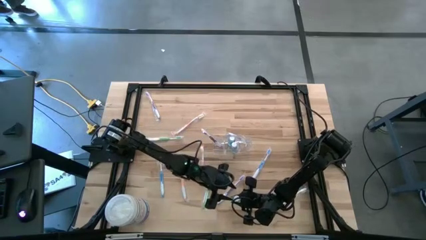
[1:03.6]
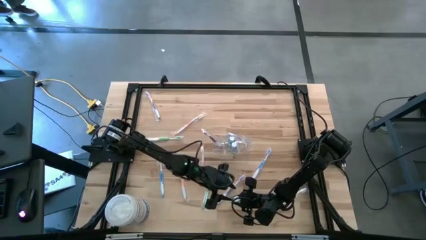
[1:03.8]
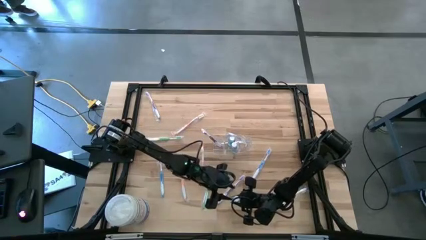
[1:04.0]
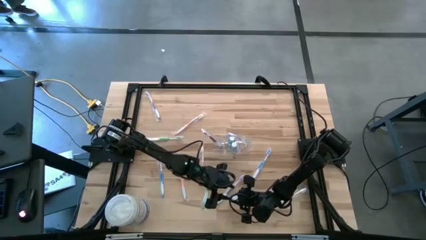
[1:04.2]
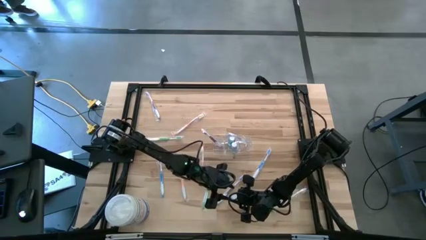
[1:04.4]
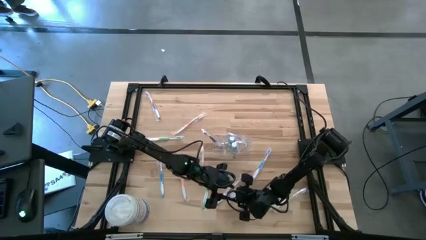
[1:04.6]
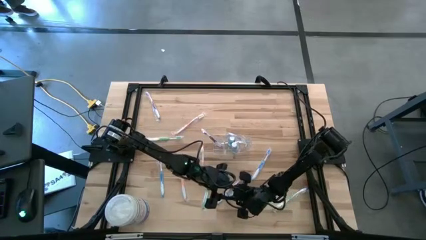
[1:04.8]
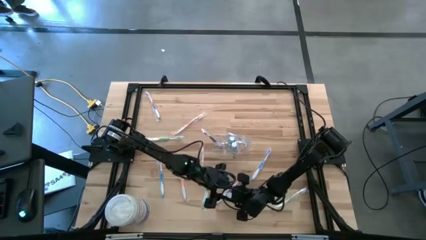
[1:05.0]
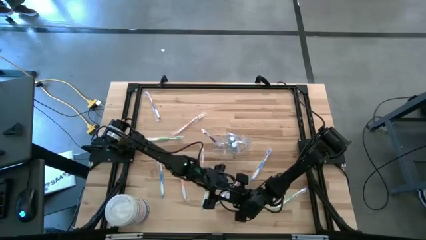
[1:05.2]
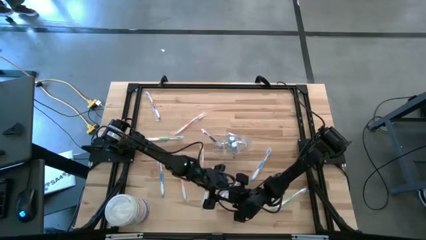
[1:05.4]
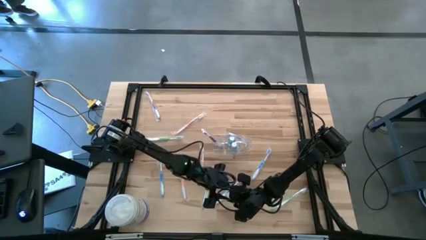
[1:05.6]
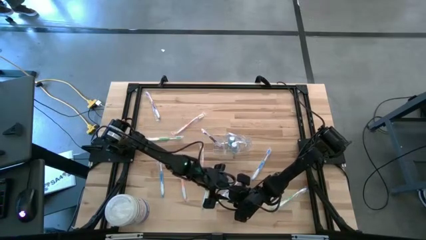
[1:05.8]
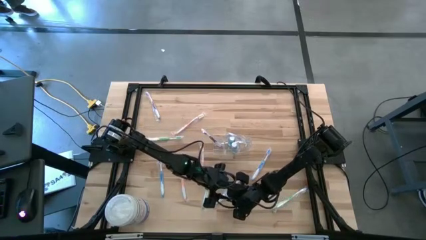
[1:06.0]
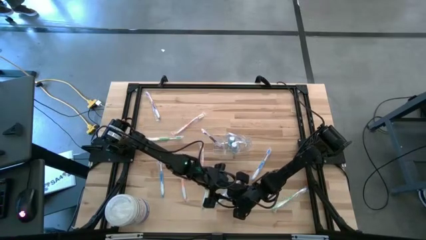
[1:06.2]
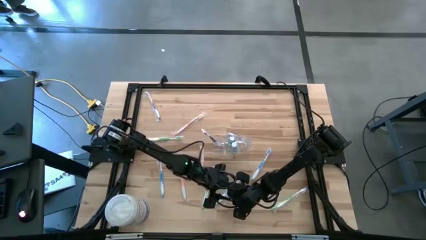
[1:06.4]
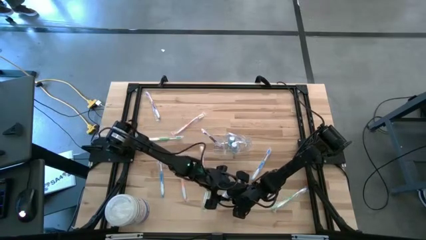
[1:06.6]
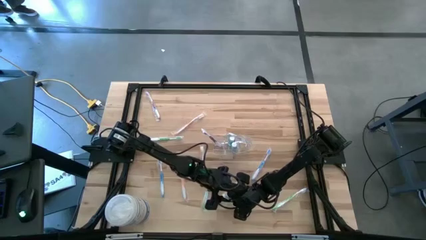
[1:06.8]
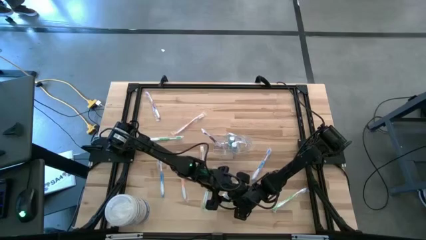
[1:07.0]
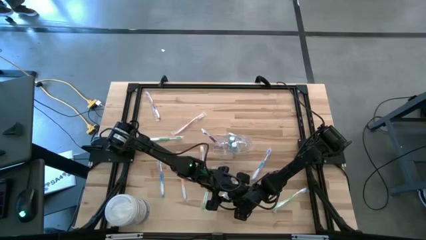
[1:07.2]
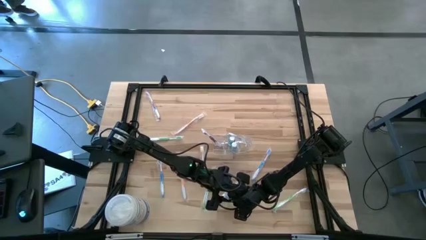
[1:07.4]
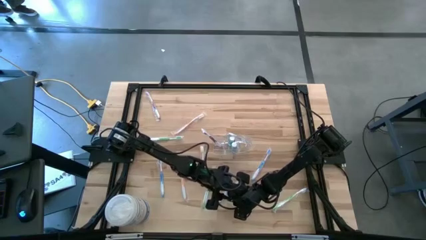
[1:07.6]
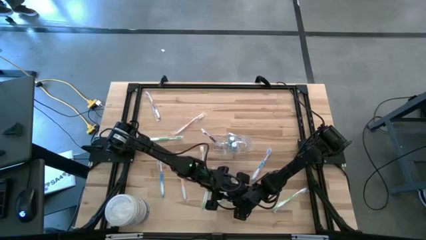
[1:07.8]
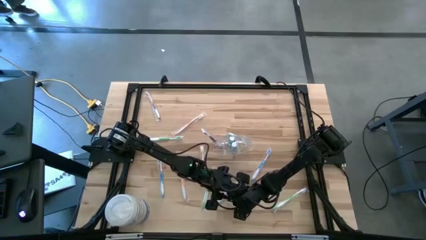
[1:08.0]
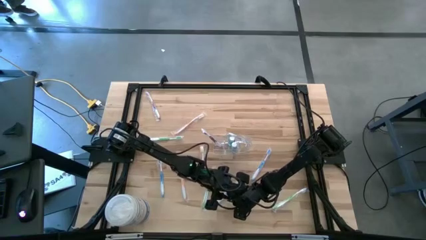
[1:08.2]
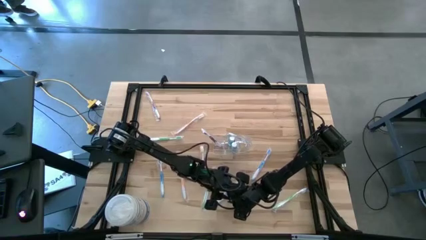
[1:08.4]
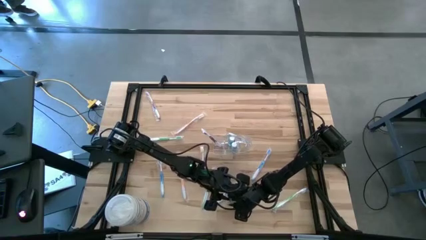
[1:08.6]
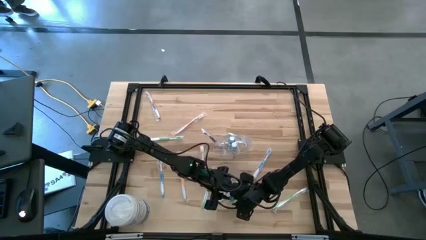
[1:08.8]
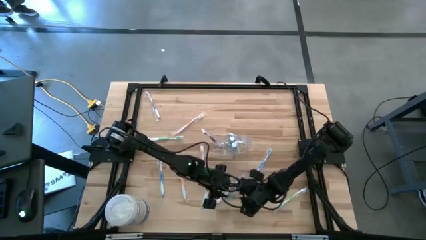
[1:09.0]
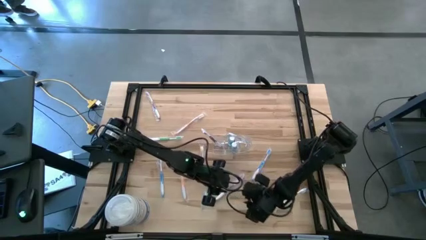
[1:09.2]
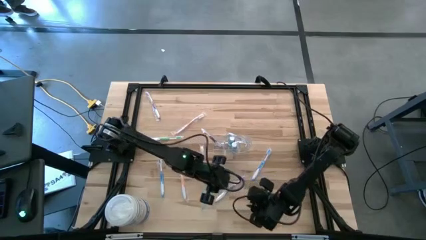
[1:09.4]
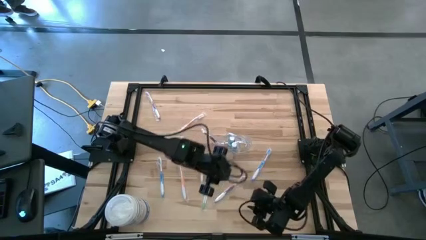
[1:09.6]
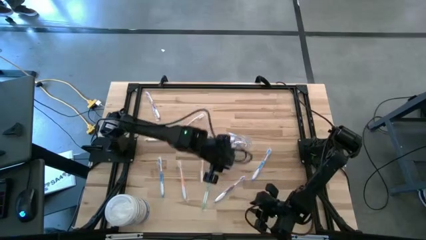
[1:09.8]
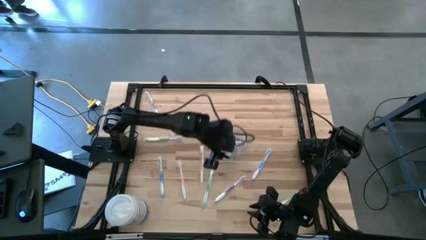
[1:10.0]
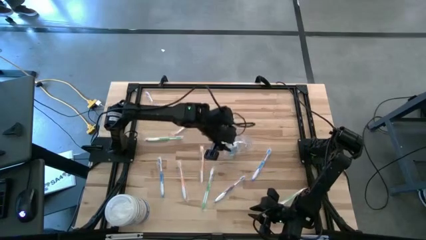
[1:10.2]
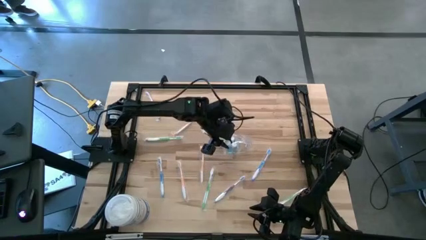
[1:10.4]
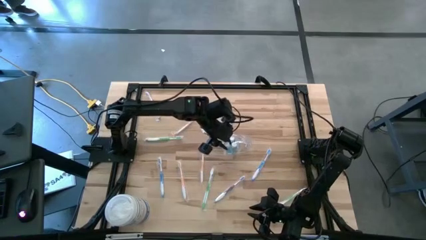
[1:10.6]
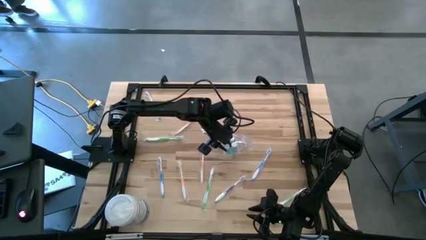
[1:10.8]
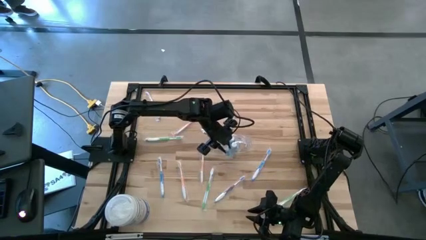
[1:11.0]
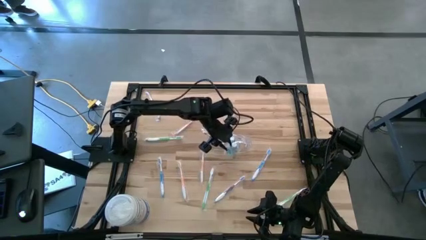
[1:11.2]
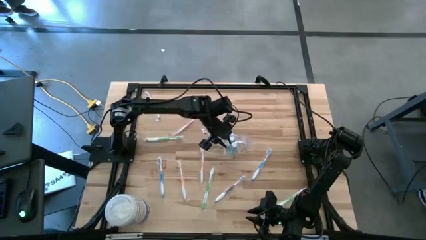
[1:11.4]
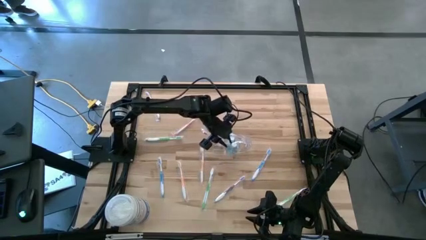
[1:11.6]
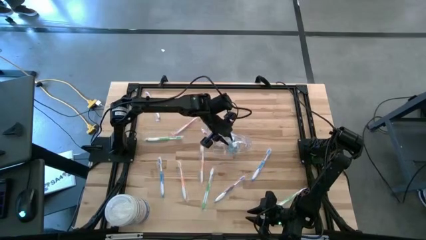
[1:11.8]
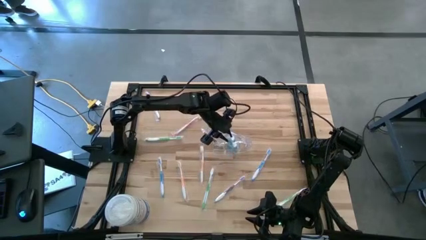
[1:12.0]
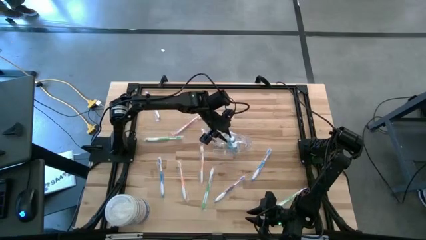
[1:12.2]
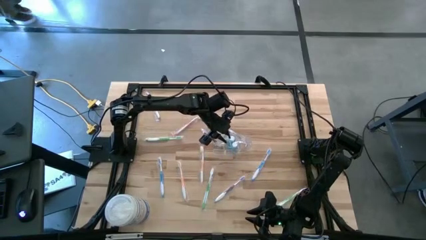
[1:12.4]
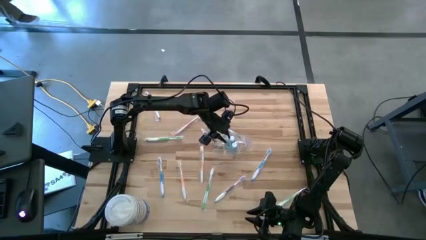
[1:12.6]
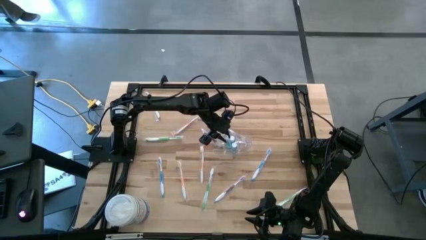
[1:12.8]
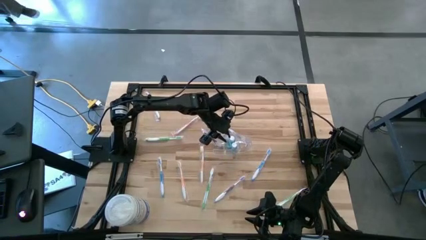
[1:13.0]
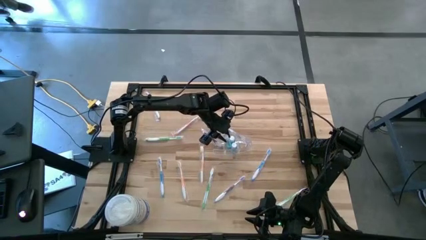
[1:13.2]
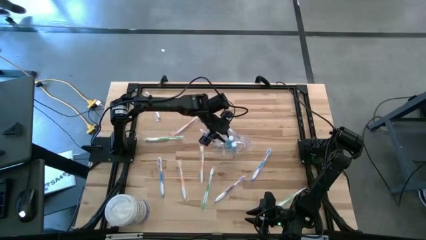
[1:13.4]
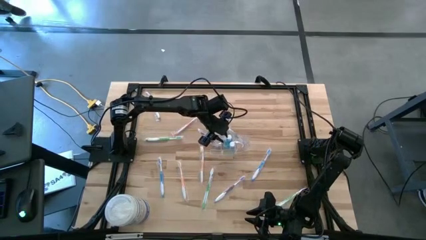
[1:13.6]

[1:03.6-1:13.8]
Task: Pick & Place toothbrushing station
Put the blue mouthwash into the wire organizer
